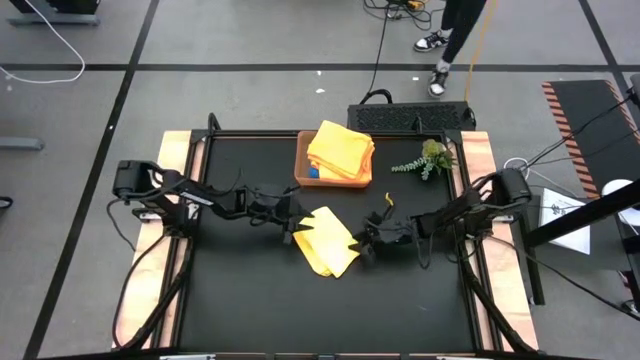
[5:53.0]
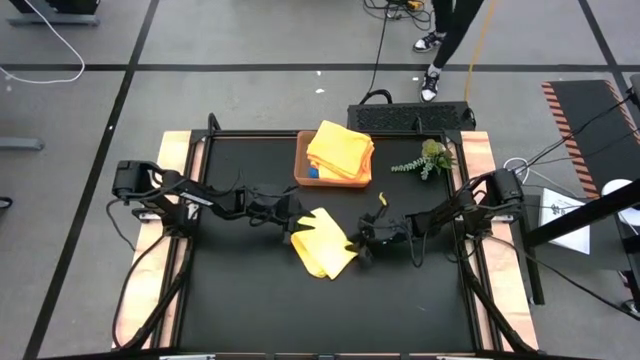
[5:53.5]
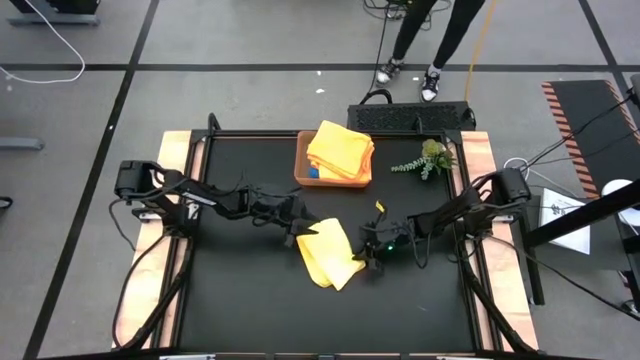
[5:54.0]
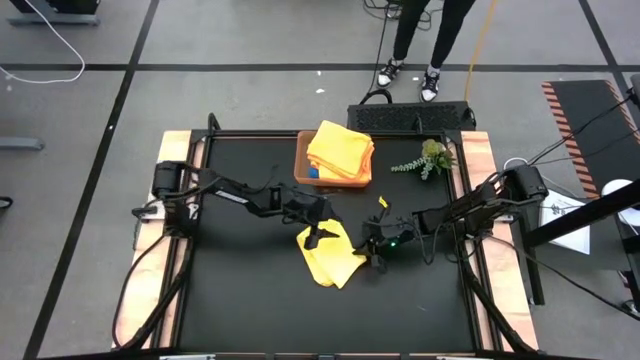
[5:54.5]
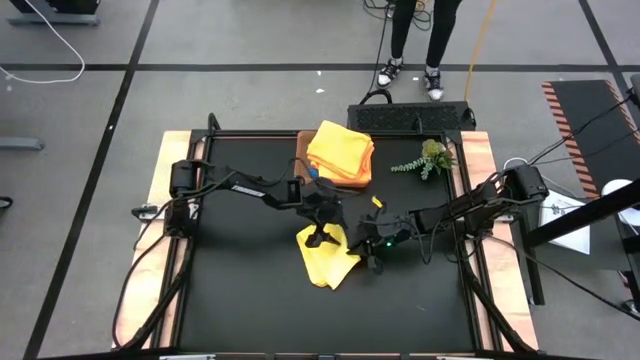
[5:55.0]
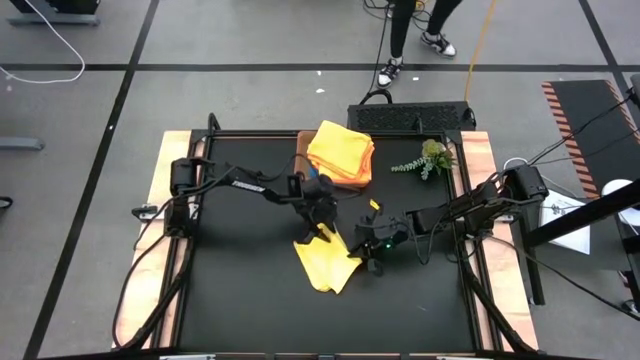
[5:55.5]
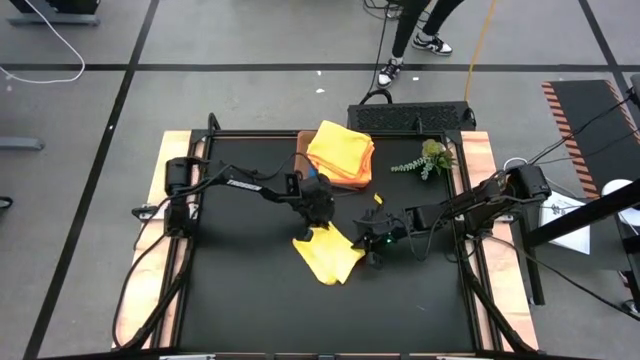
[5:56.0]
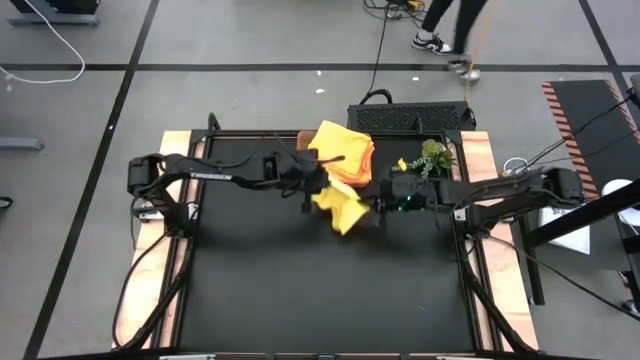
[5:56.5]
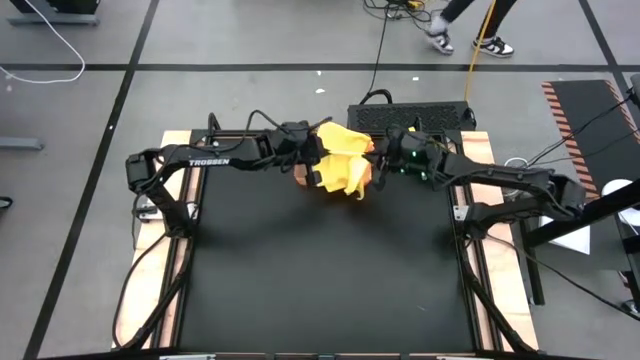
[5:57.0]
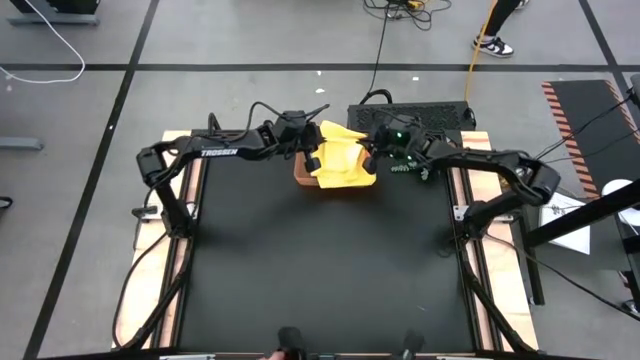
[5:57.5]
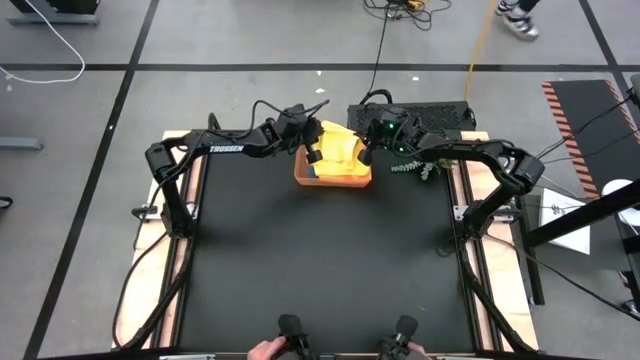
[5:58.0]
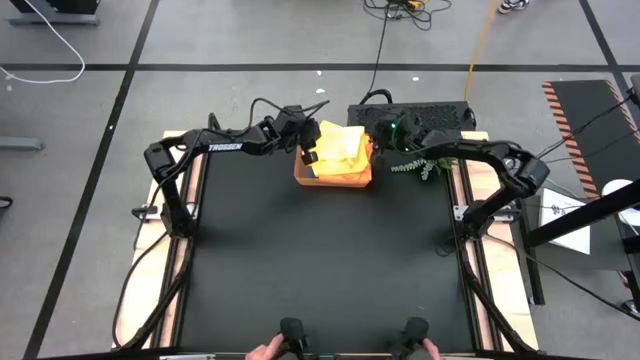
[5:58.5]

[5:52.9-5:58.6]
Task: Fold microfiber towels
Put the yellow microfiber towel into the orange bin

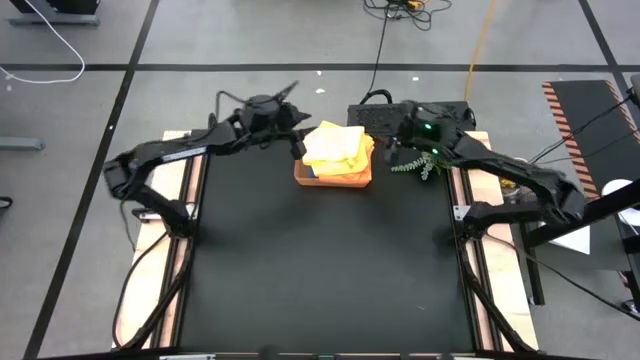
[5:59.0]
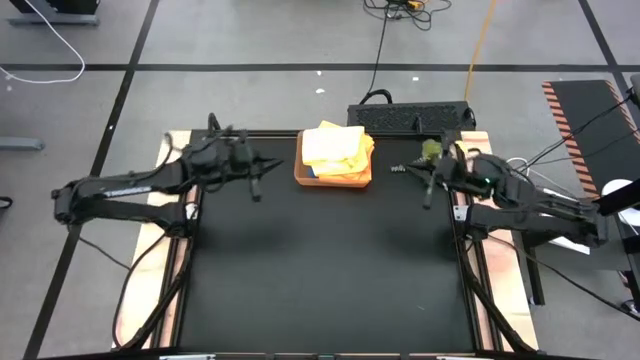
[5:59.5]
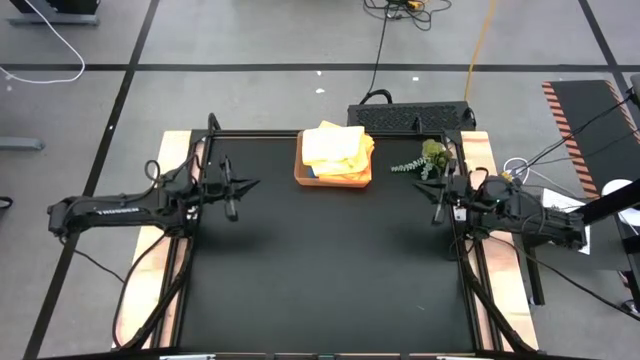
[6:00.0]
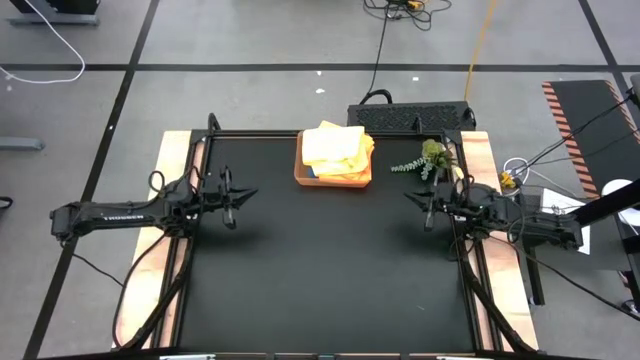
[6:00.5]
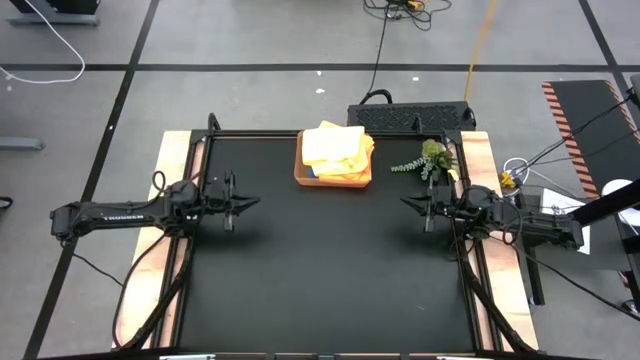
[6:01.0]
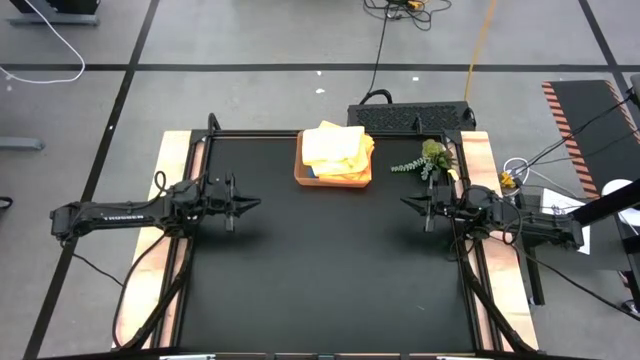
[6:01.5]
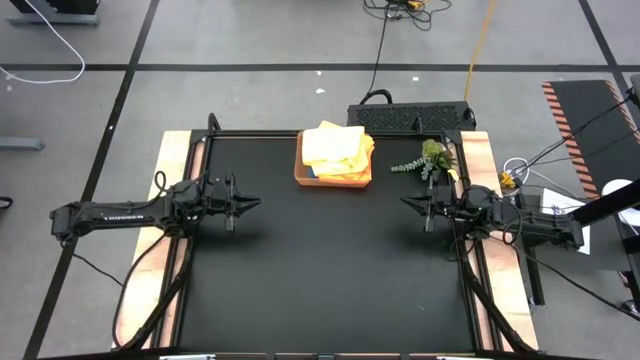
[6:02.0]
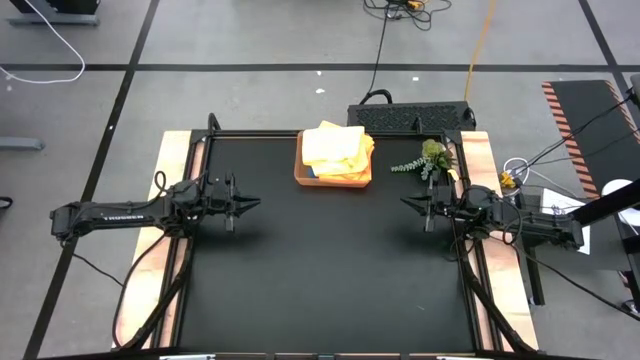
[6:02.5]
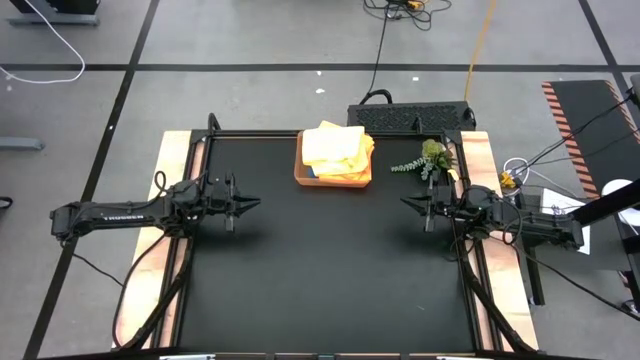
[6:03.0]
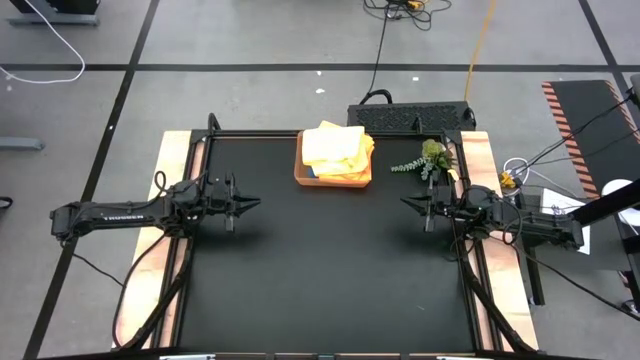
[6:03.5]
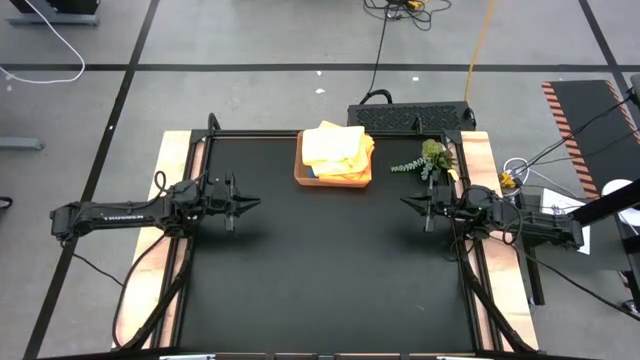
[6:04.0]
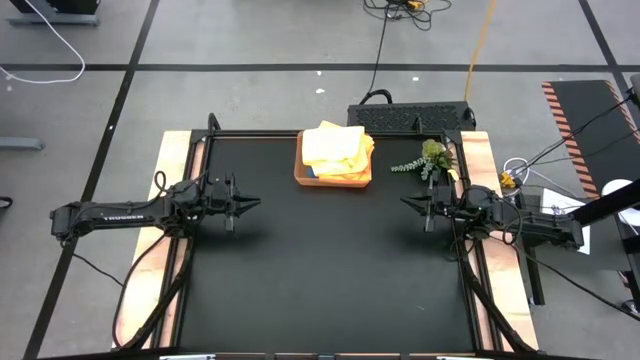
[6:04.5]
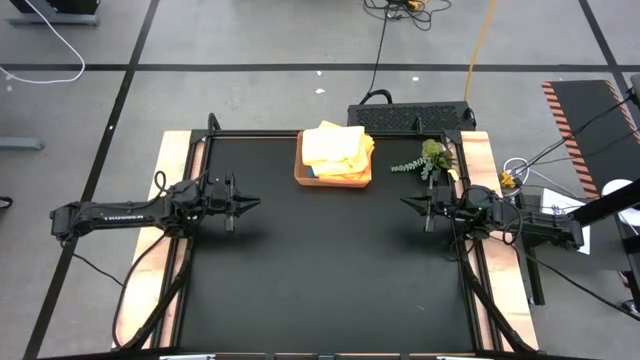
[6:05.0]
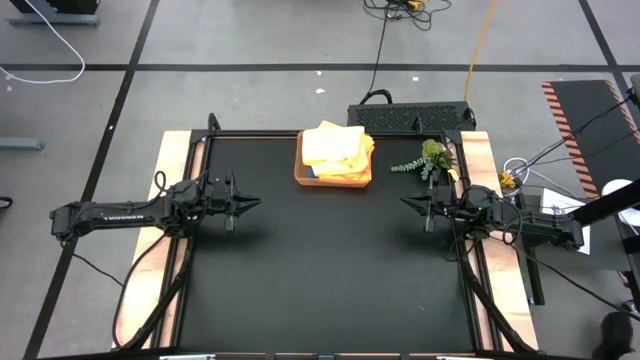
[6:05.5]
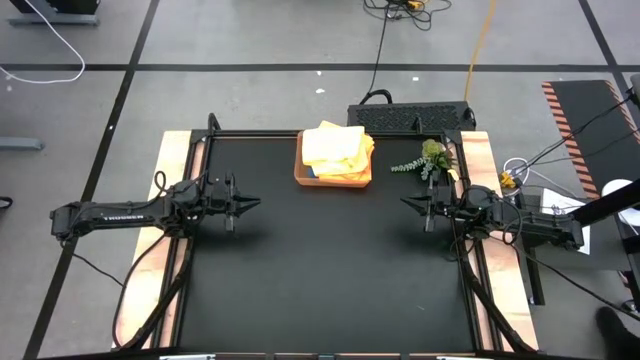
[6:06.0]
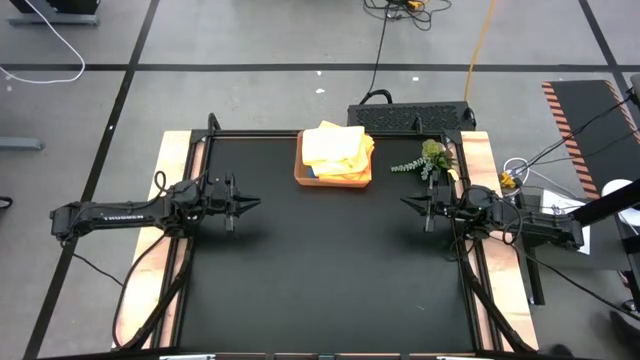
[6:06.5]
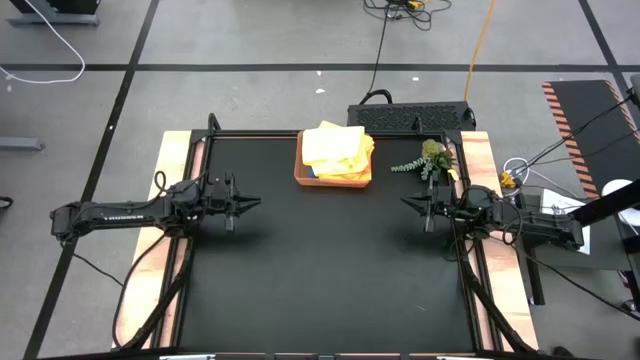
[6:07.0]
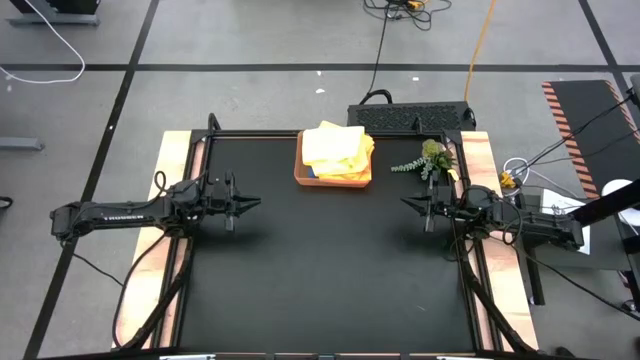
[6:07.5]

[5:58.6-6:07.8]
Return to Home Position

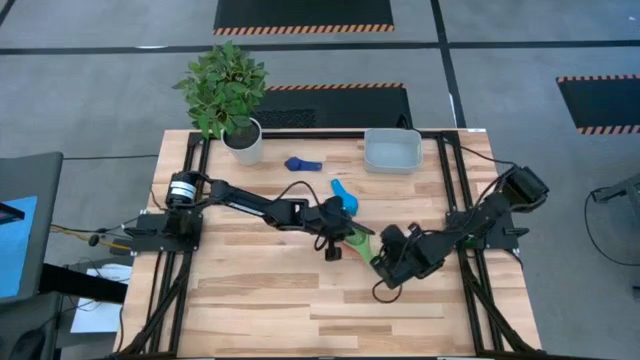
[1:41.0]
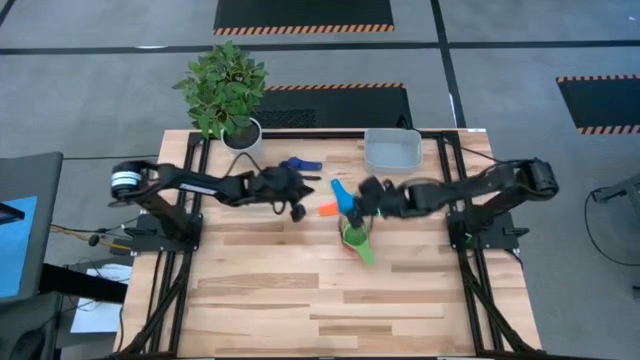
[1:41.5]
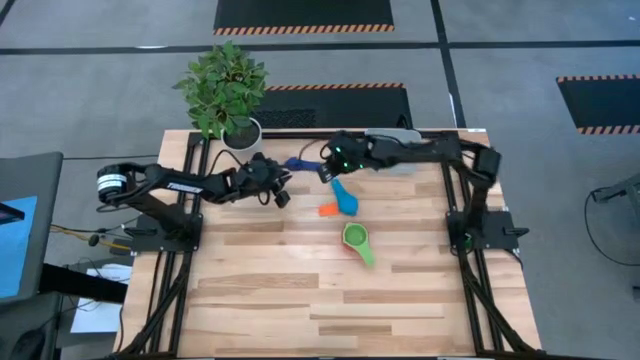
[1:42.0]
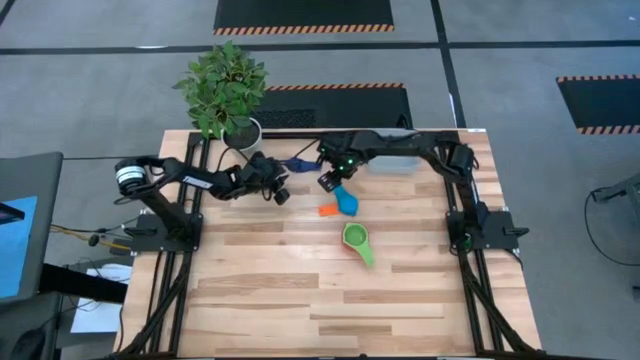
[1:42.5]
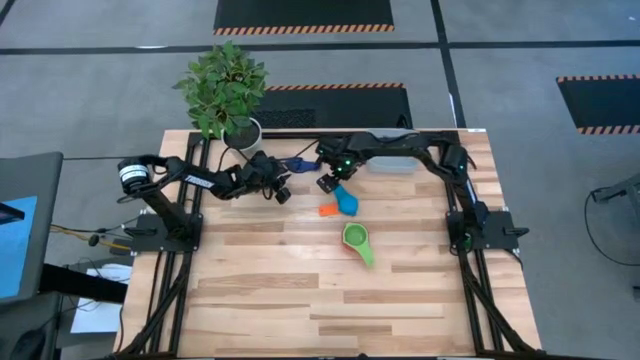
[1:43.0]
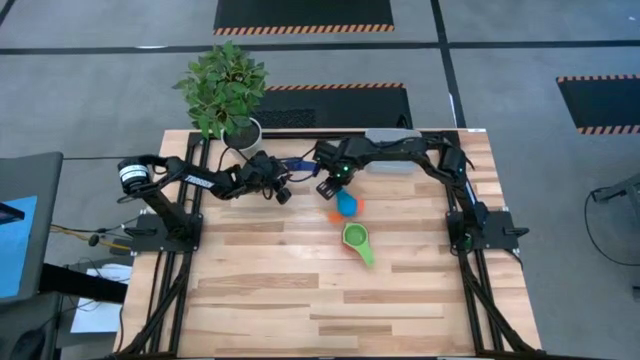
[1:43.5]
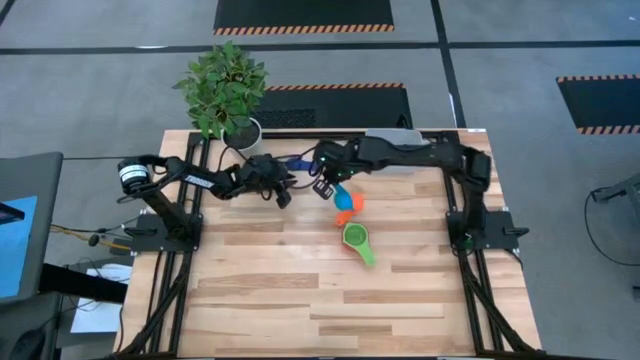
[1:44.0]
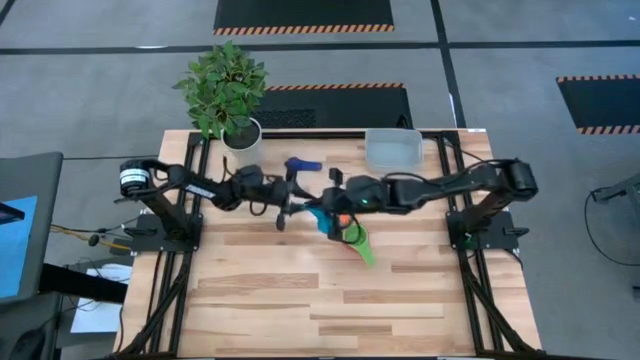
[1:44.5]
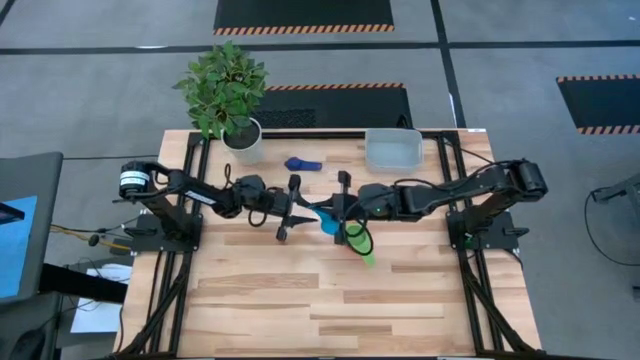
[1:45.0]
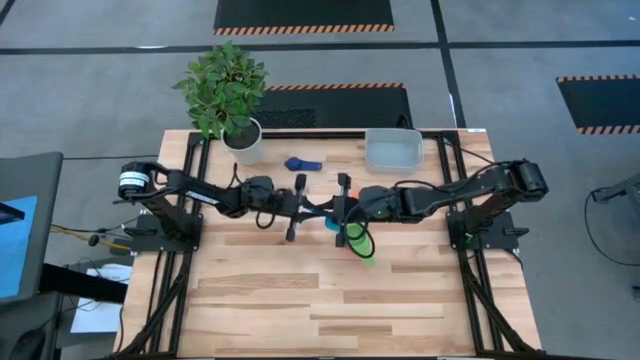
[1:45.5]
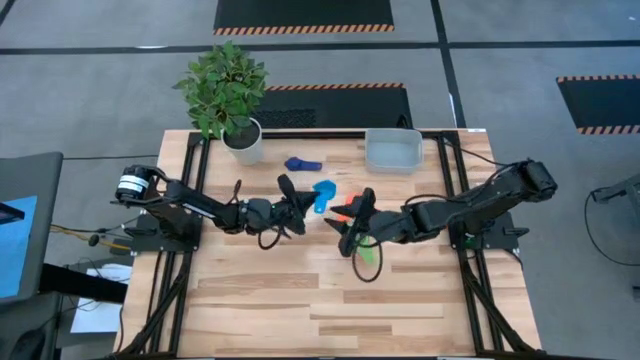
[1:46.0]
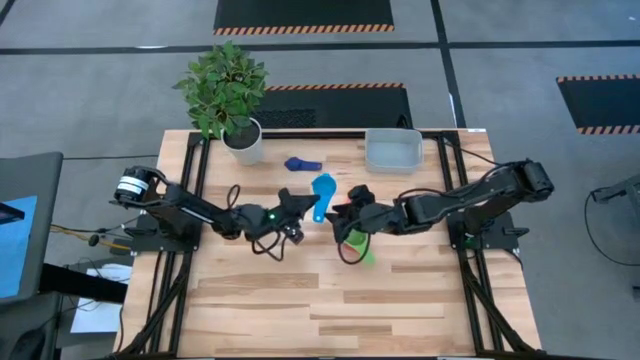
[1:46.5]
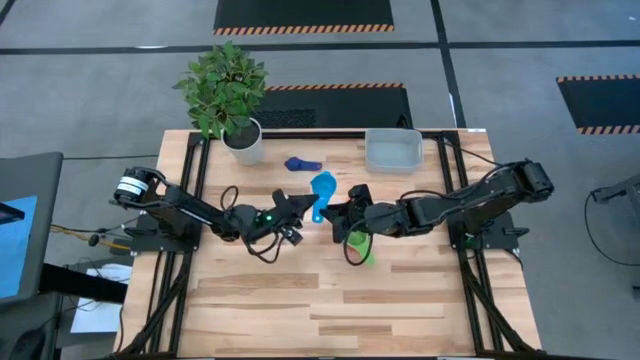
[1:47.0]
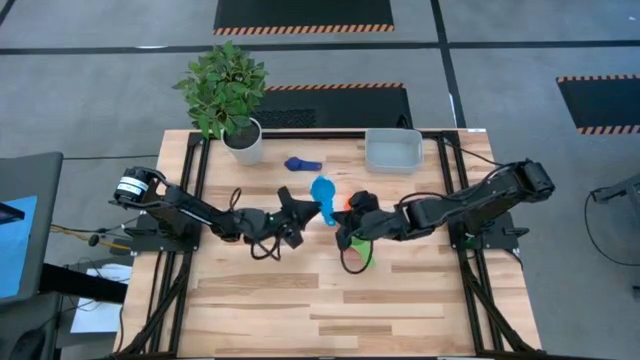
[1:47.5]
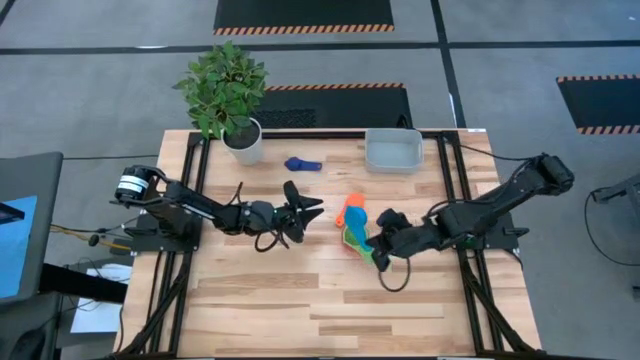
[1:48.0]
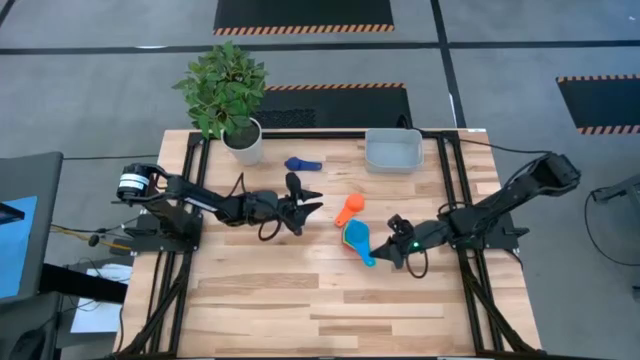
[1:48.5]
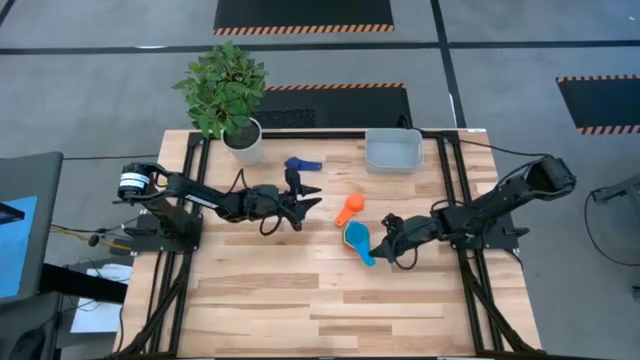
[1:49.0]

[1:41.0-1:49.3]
Task: Nest measuring cups in basket
Stack the light blue measuring cup on top of the green measuring cup
